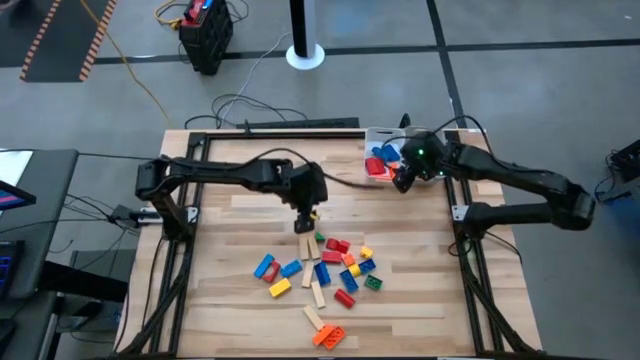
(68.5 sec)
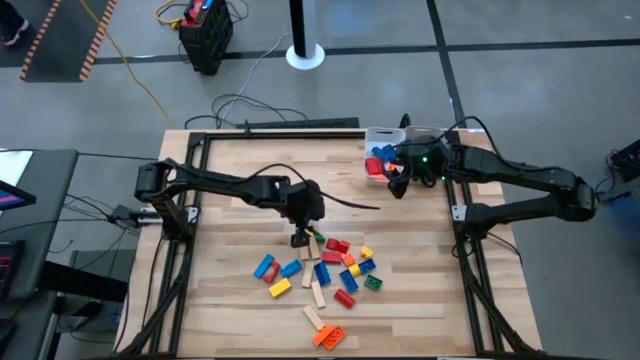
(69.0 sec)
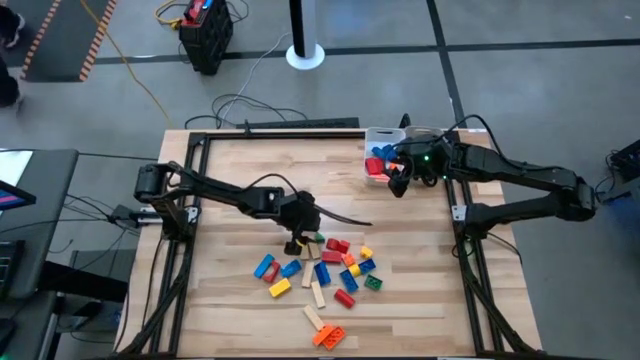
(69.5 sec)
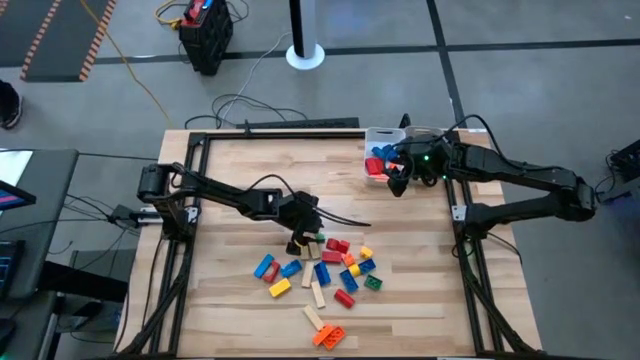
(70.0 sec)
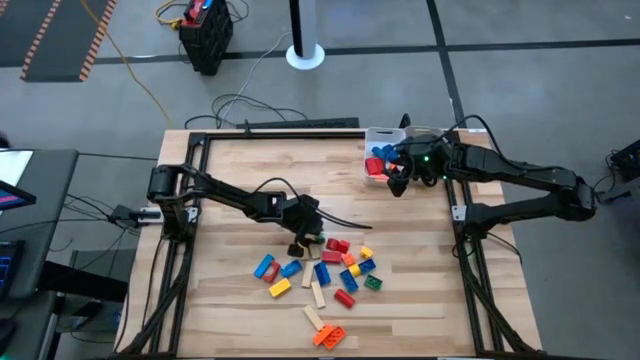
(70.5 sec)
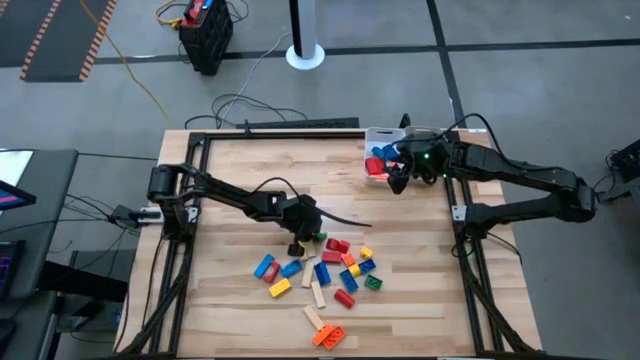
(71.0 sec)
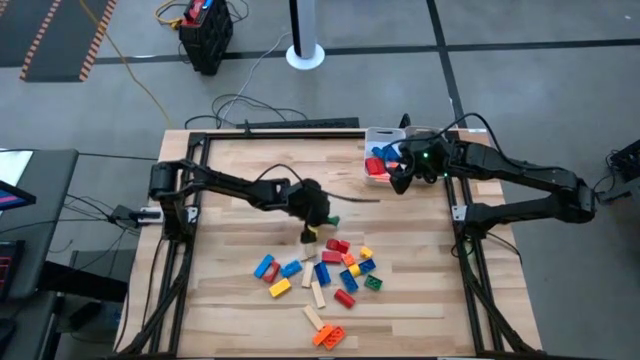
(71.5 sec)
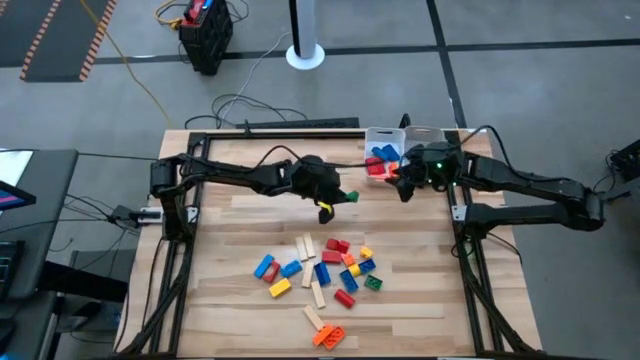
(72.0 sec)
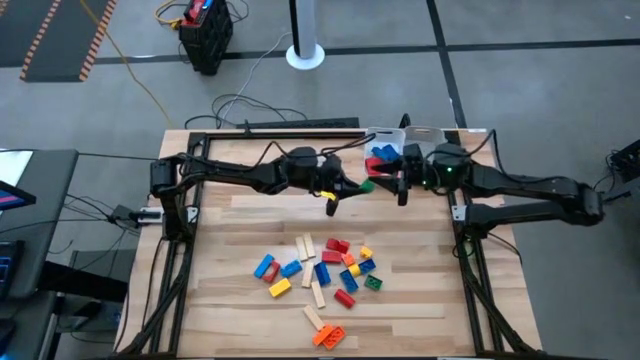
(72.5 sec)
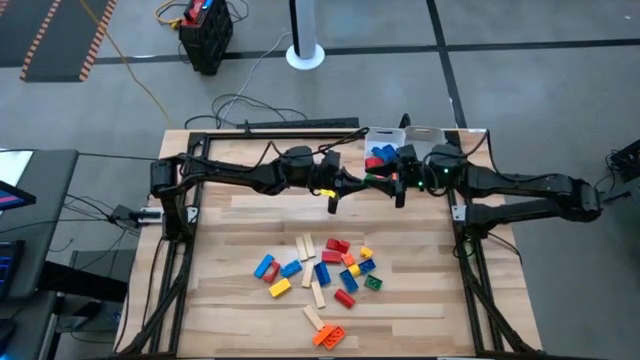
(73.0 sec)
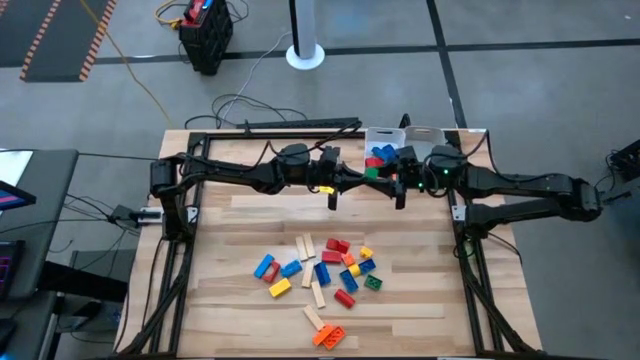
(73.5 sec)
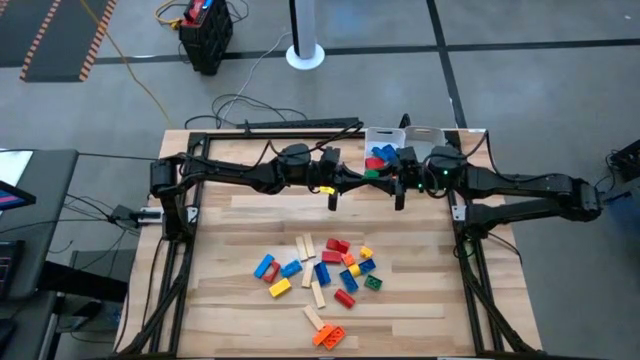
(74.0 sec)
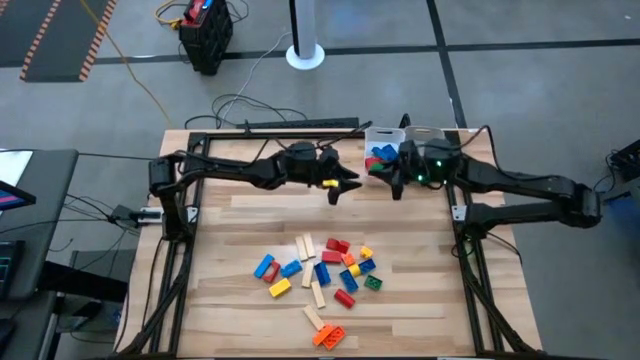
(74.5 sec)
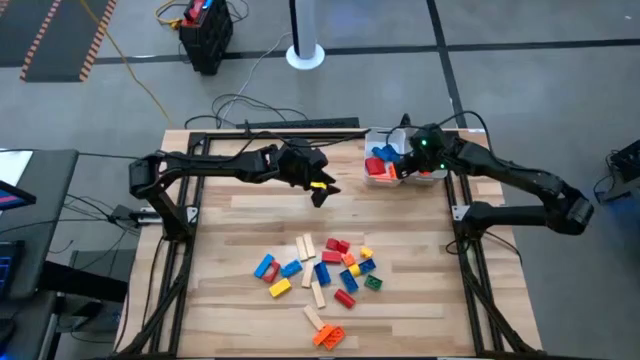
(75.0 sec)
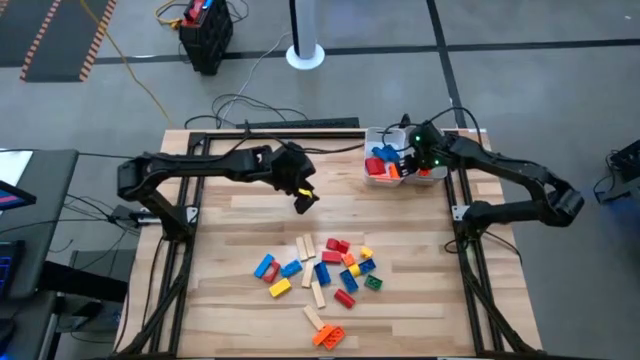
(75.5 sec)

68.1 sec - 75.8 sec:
Task: Sort blocks by size
Put the small green triangular wooden block into the gray bin

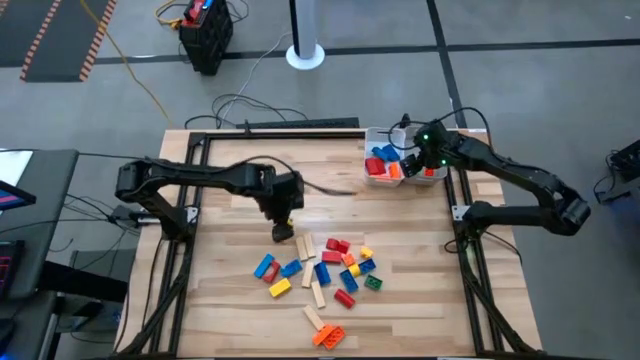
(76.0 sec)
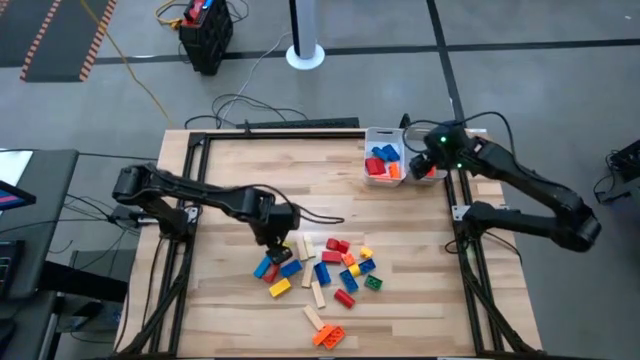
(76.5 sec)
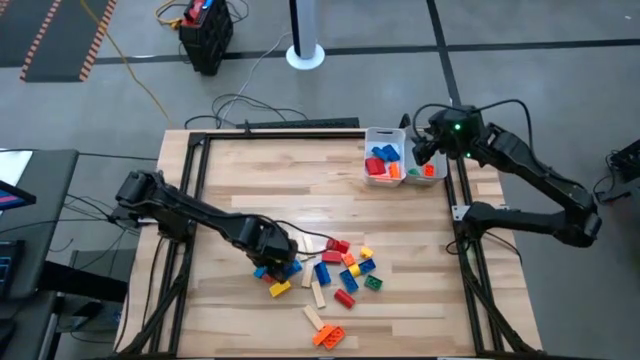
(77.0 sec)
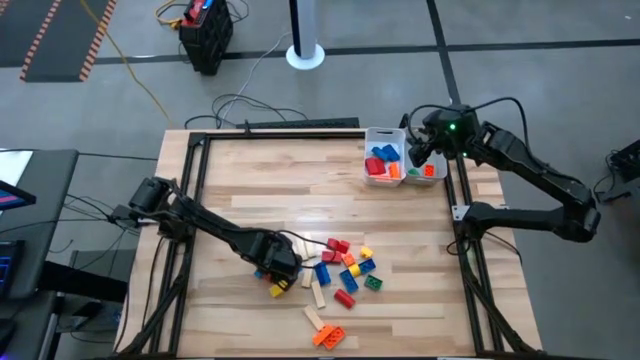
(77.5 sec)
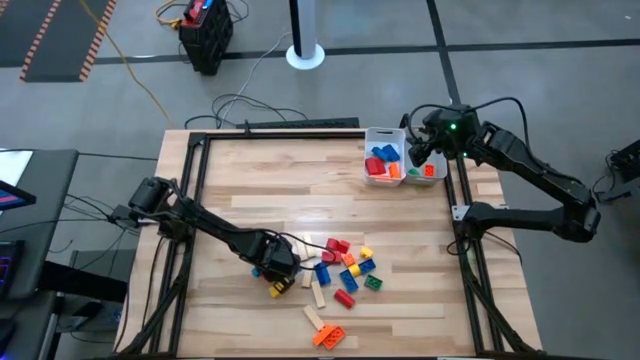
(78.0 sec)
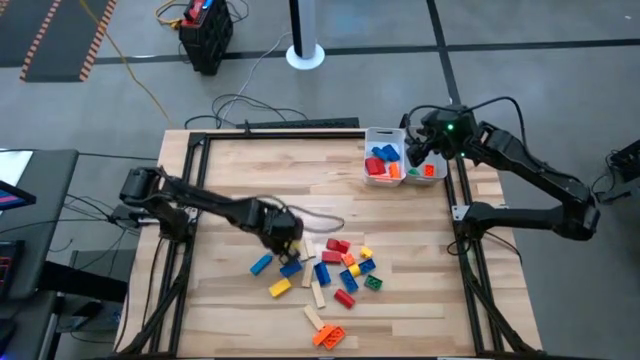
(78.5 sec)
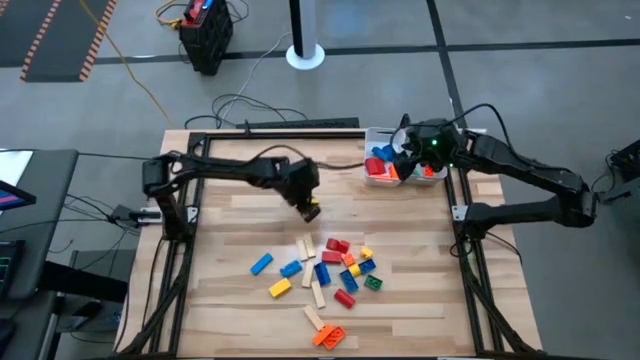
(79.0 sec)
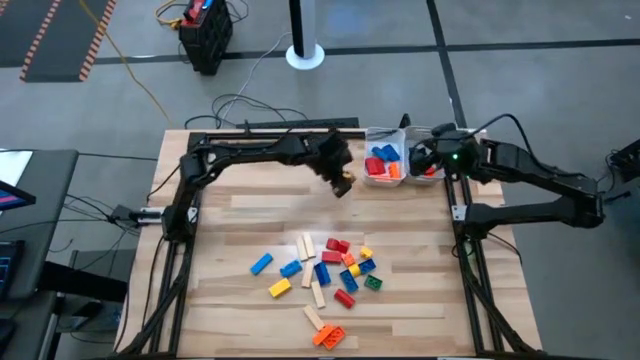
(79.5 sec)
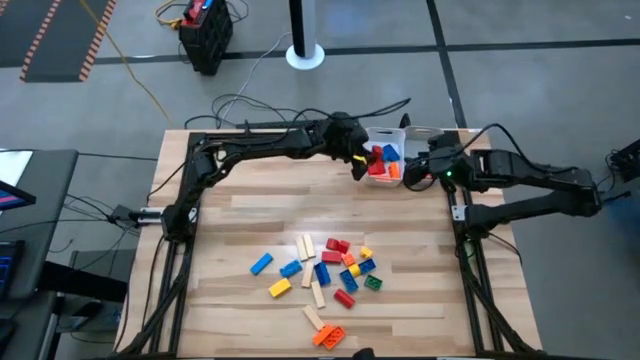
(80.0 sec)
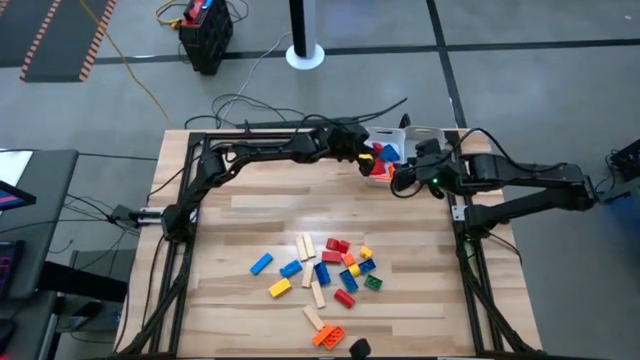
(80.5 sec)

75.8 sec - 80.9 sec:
Put the large red wooden arch into the white bin

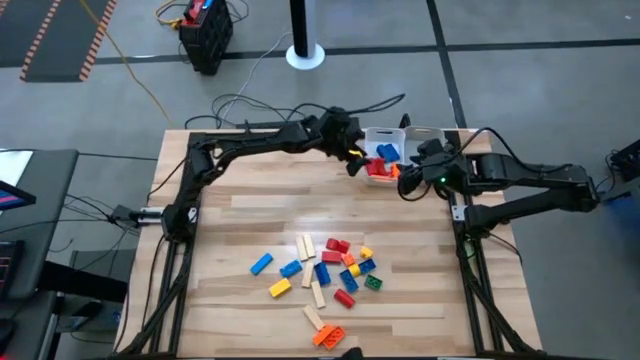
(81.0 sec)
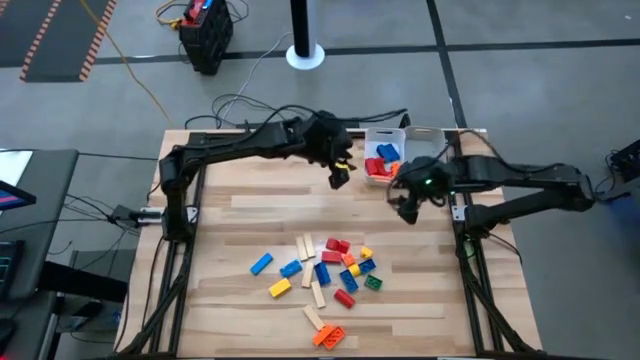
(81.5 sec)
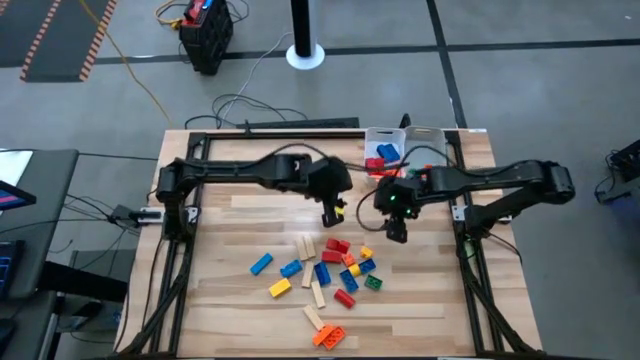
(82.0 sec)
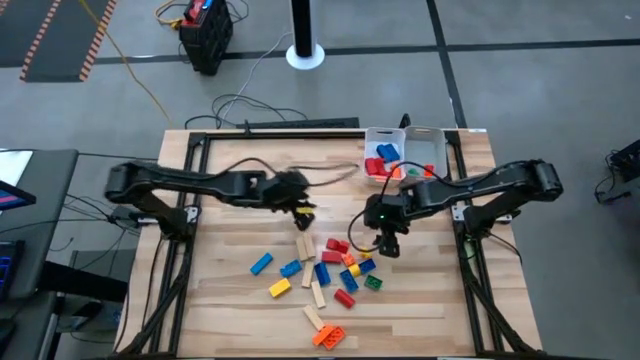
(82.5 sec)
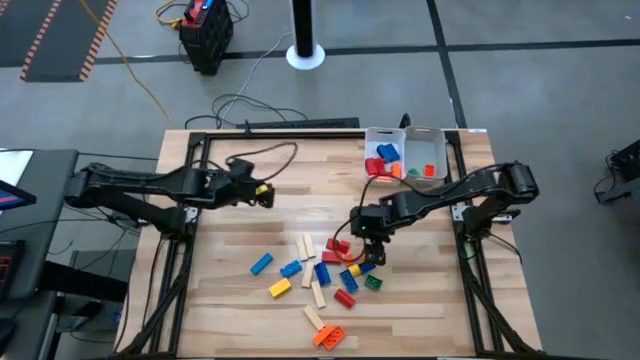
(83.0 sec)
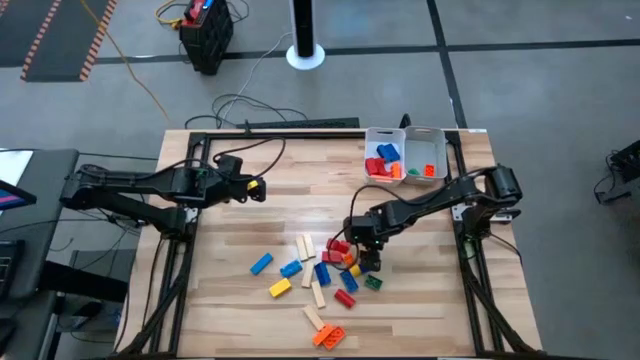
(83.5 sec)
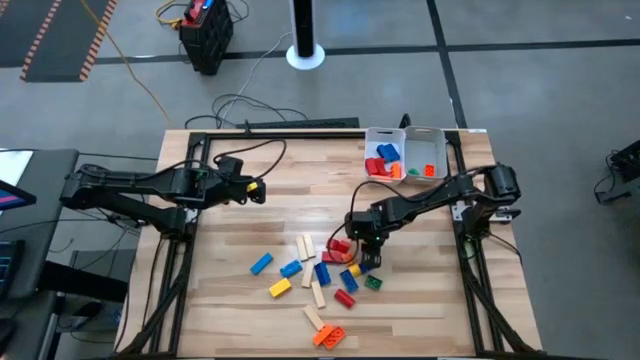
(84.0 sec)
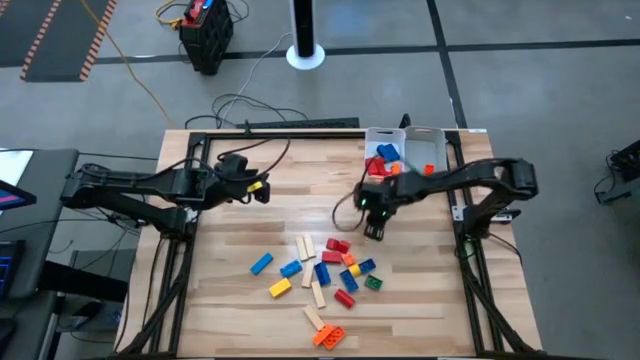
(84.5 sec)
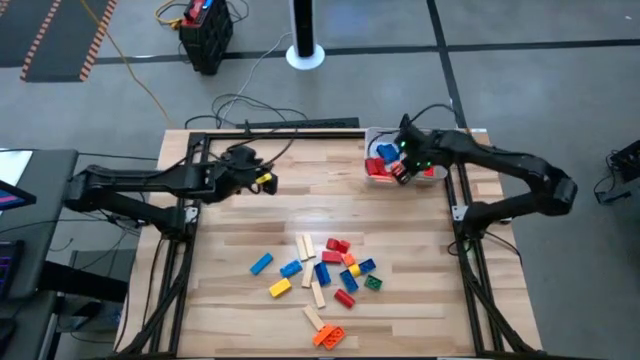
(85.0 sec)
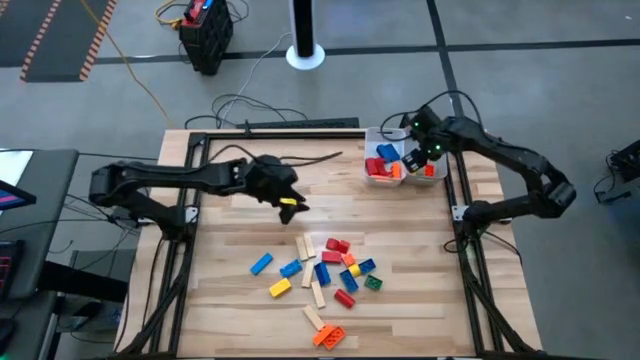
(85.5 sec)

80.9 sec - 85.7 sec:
Put the small yellow game piece into the gray bin

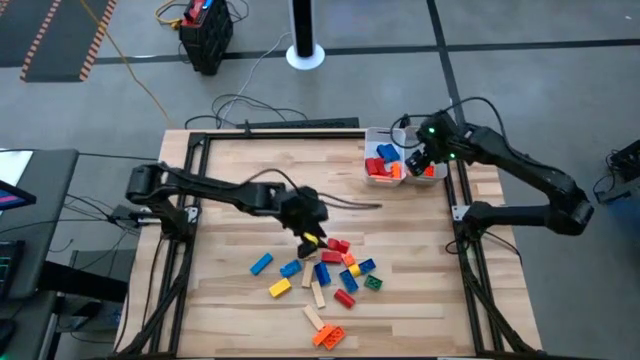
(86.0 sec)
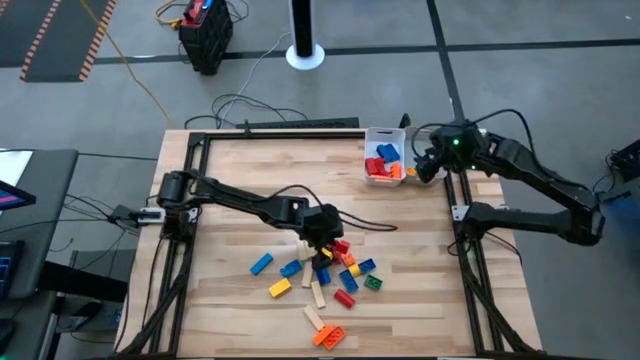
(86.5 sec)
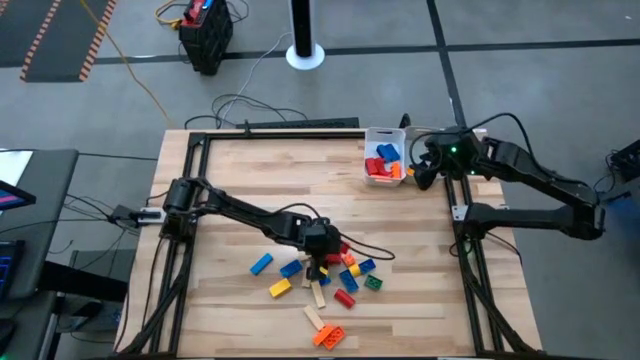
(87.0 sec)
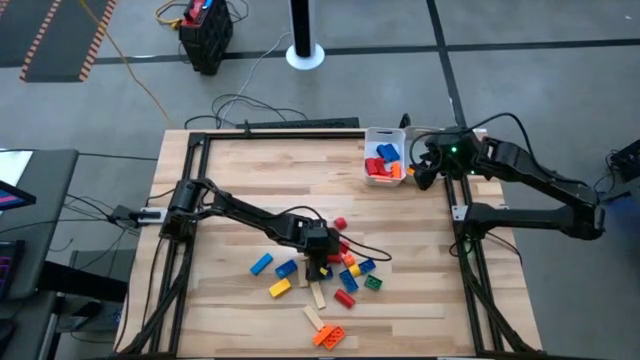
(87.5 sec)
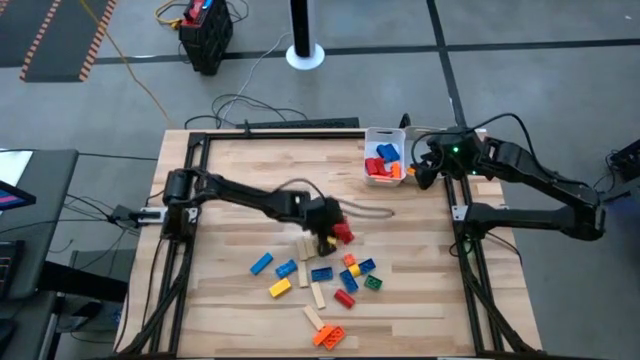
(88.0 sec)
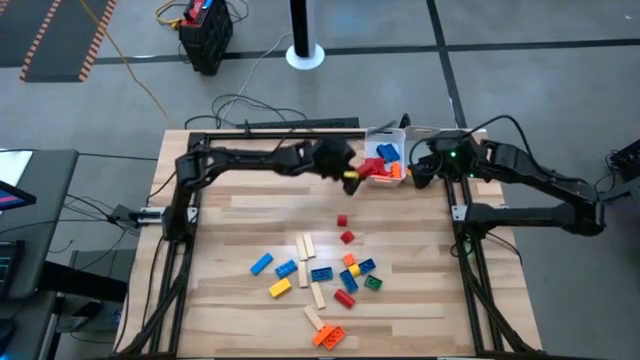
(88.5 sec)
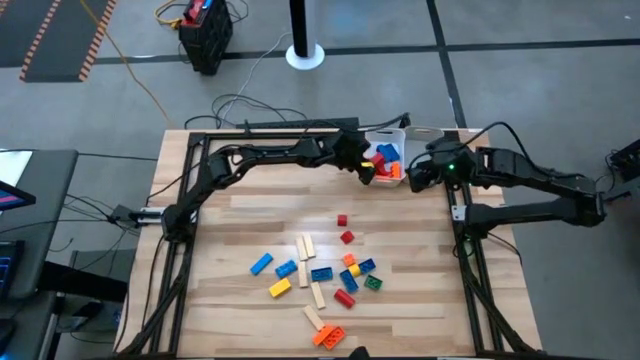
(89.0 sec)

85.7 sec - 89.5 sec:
Put the large red wooden block into the white bin
